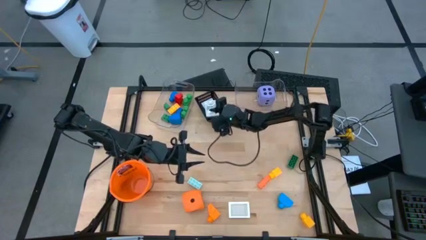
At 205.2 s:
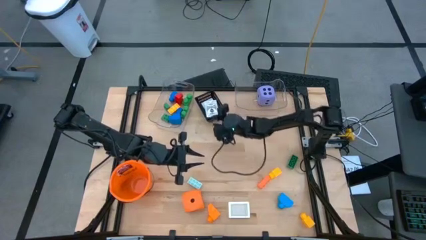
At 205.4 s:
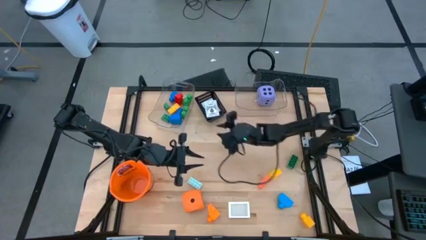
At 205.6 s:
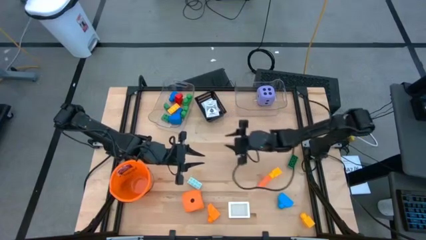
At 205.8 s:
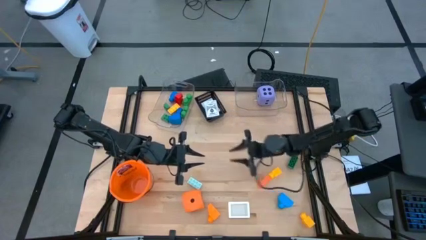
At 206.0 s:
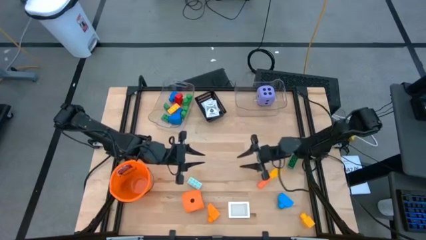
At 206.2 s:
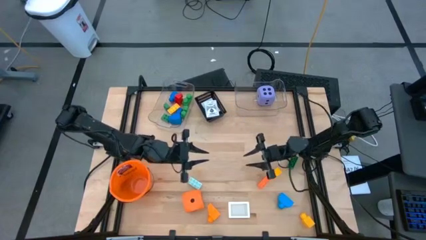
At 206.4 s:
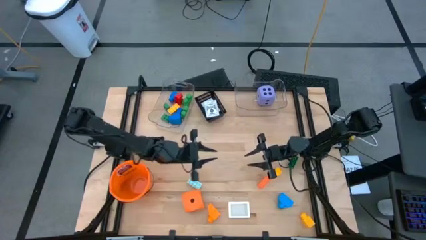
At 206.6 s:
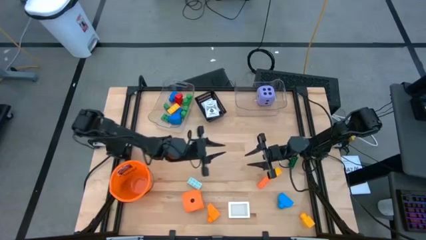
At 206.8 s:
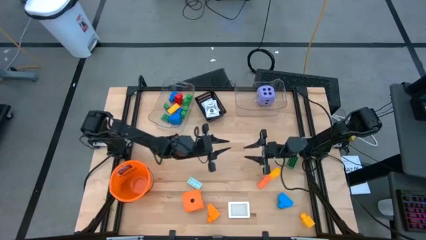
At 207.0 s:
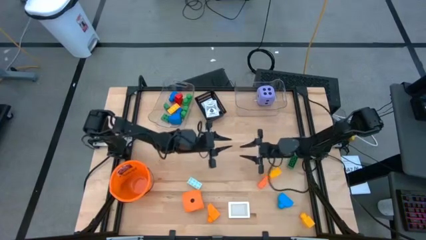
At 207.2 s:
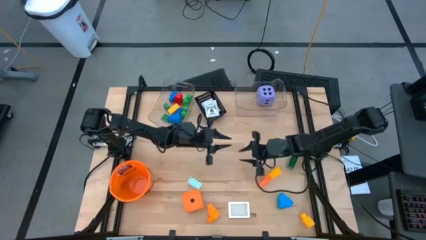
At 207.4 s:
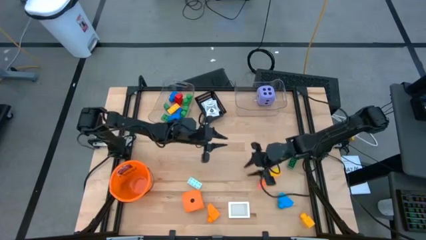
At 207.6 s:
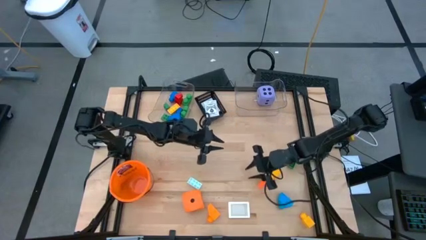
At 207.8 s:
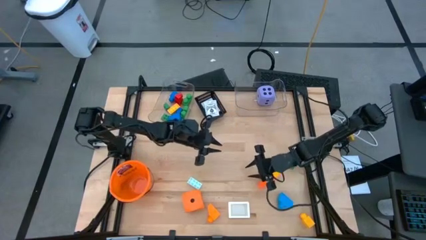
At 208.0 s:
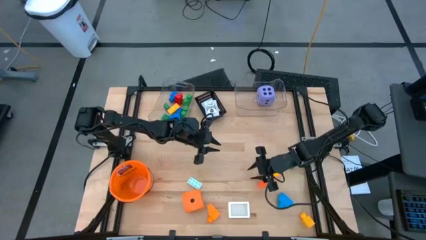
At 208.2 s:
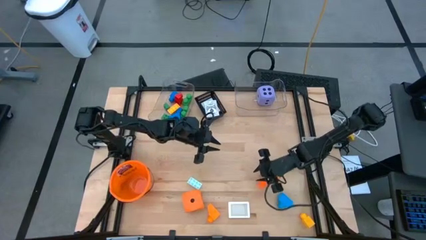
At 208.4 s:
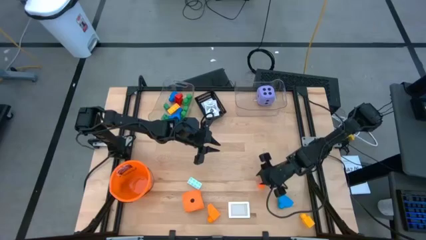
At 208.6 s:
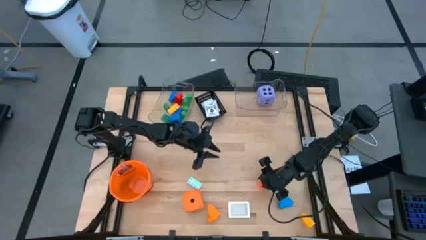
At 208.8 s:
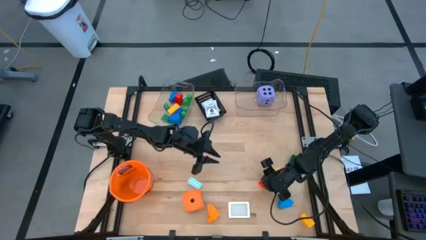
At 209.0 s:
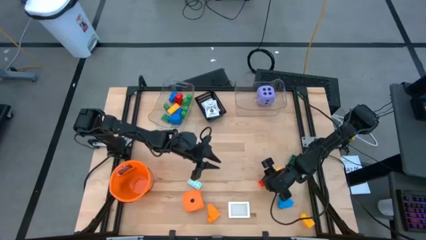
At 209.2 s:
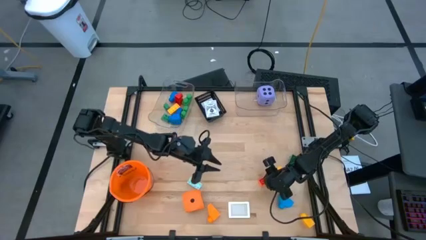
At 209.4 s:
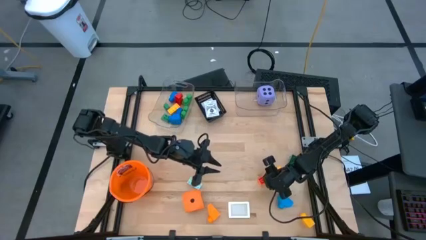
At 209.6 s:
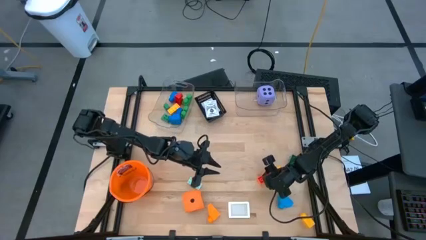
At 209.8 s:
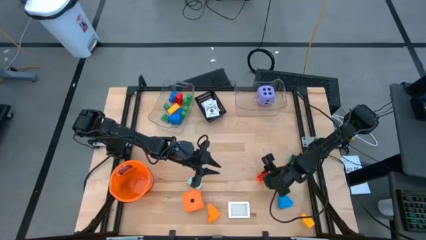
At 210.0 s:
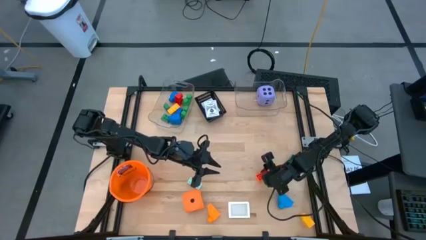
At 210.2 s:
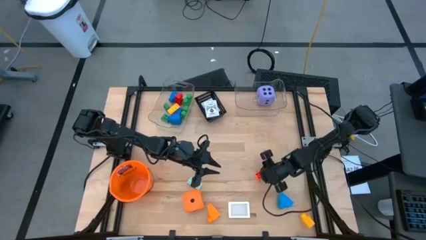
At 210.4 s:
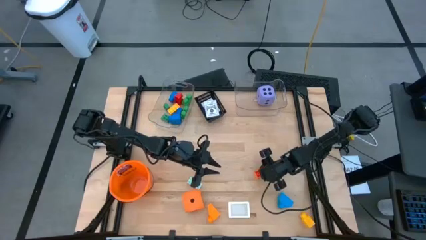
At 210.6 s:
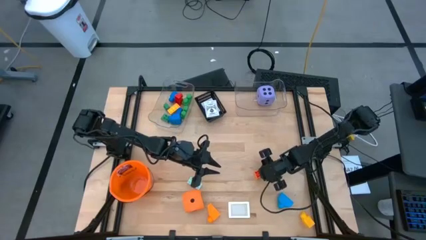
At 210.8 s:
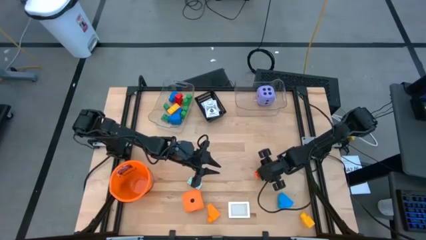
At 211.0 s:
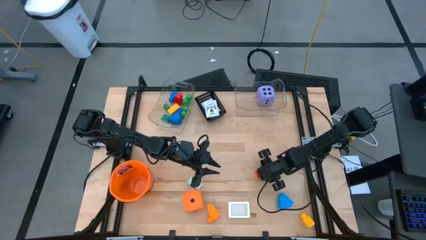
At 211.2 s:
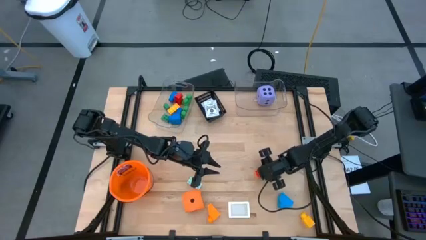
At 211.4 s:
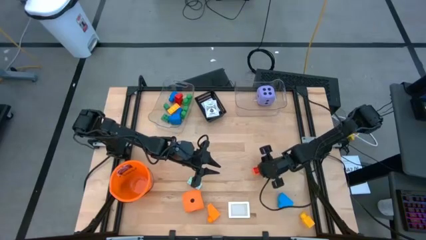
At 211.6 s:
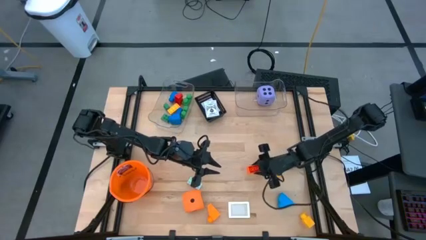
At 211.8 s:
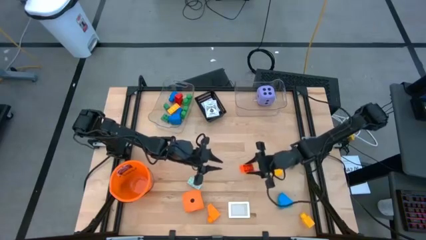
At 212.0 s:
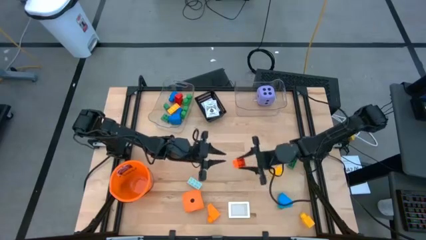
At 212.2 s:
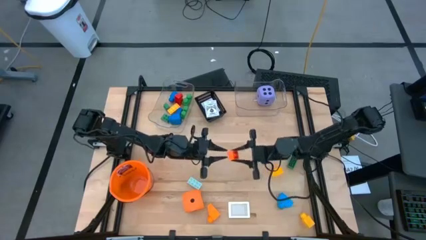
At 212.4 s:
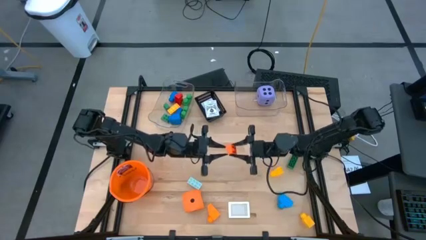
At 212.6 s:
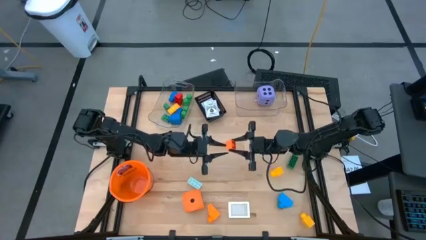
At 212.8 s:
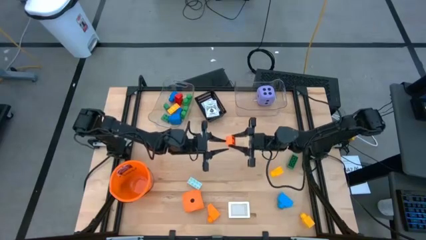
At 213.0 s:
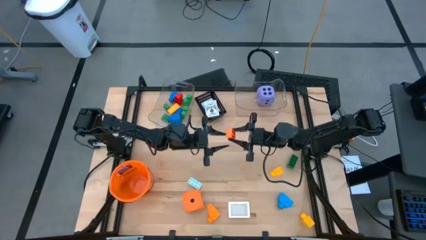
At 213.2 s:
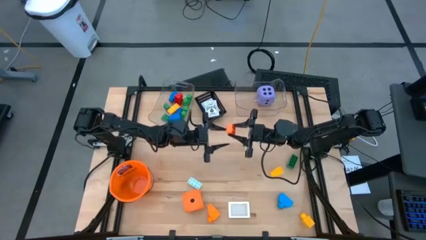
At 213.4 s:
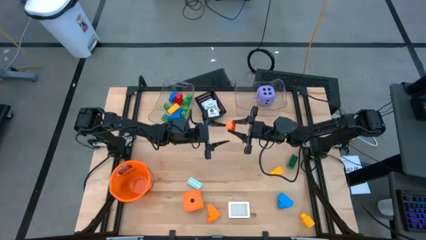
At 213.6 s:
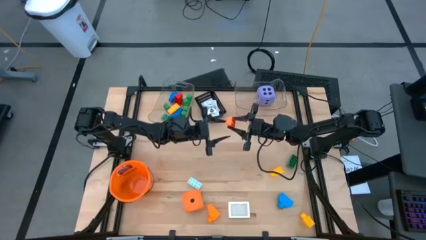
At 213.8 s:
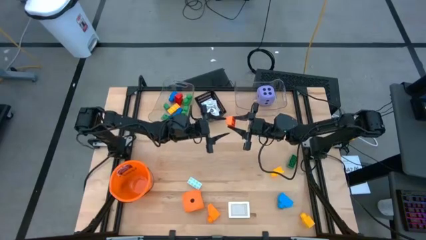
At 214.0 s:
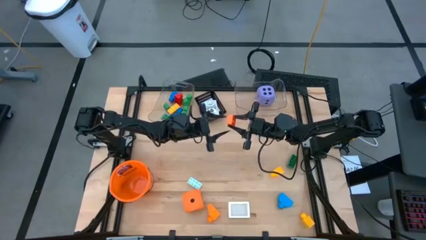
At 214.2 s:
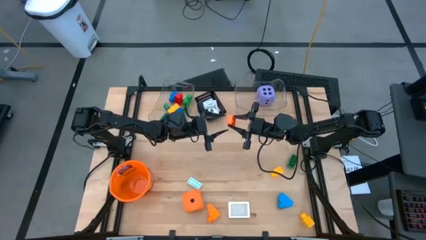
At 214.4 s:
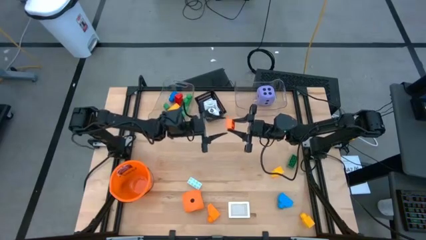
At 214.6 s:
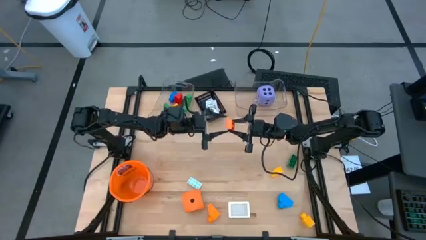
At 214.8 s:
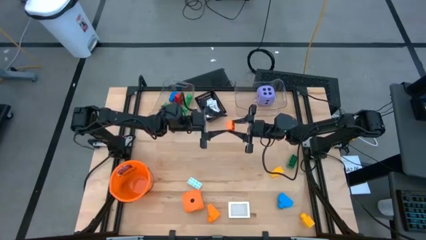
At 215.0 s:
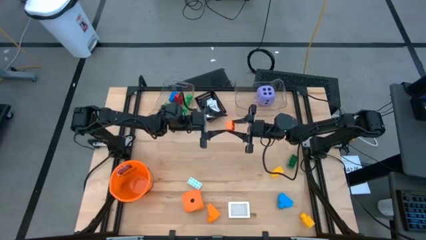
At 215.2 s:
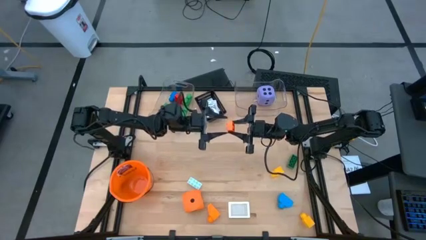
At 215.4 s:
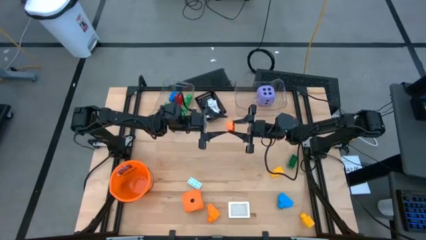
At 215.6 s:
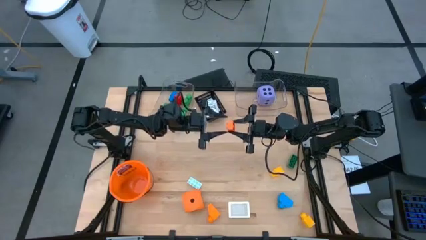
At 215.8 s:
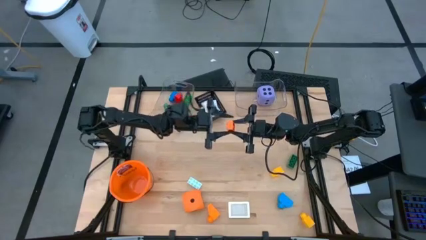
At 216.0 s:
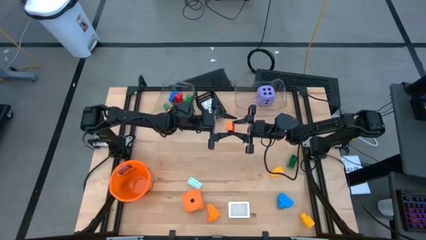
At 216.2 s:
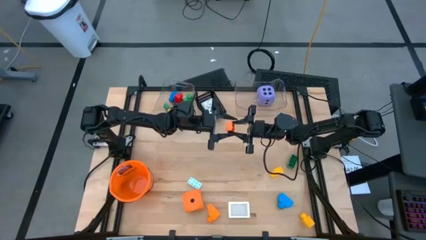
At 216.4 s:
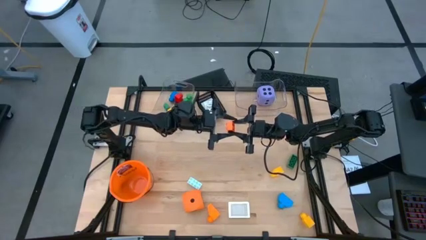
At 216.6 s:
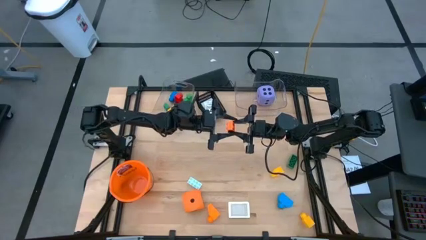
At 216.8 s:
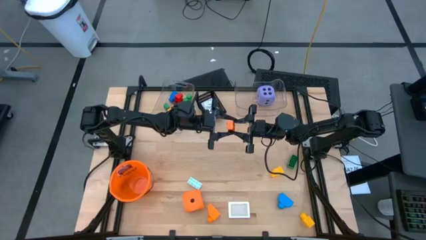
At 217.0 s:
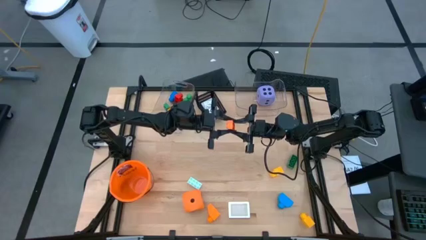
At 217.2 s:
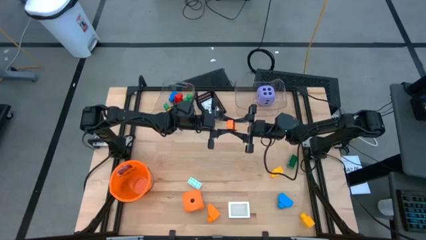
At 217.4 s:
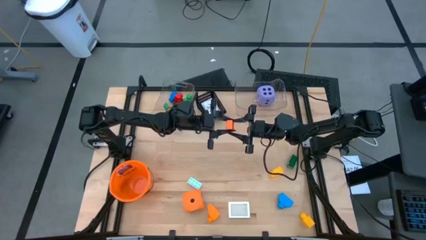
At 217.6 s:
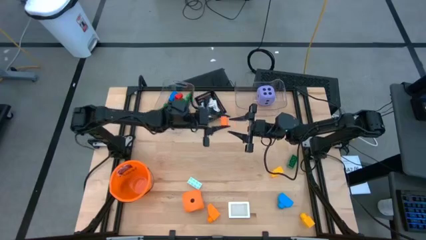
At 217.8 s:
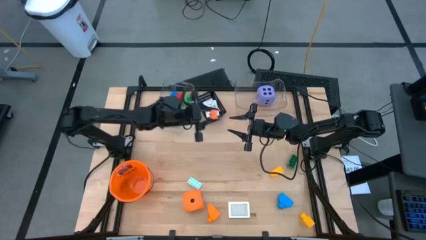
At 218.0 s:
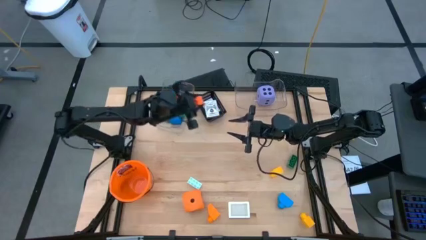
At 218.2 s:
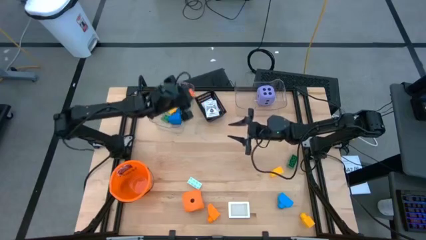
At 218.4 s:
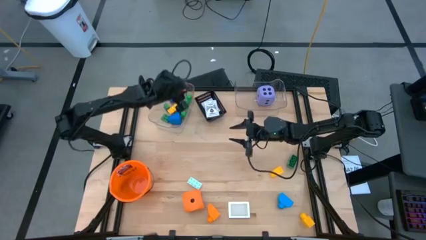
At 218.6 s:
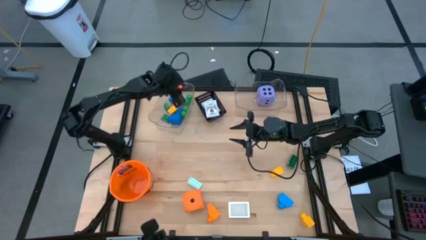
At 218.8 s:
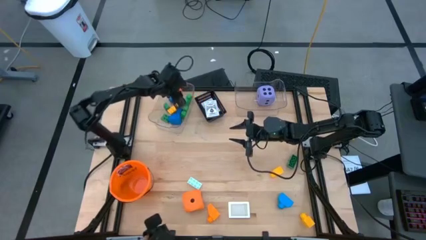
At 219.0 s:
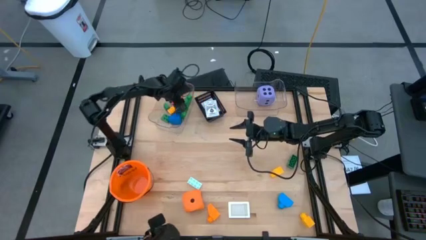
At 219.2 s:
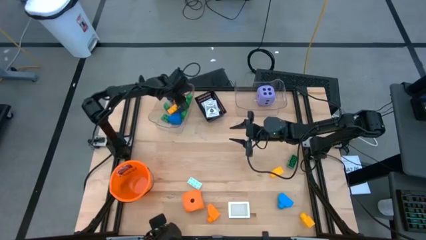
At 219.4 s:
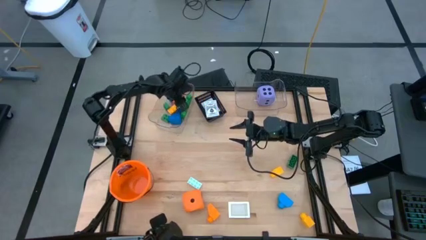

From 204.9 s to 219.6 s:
Task: Pick & Place Toys
Put the orange gamepiece into the left transparent bin
